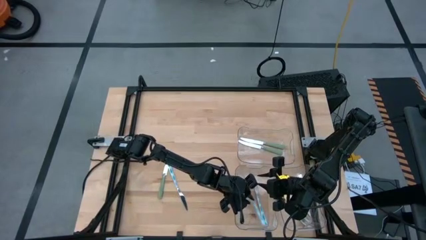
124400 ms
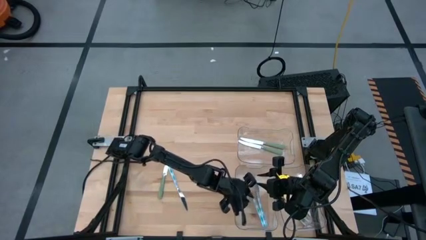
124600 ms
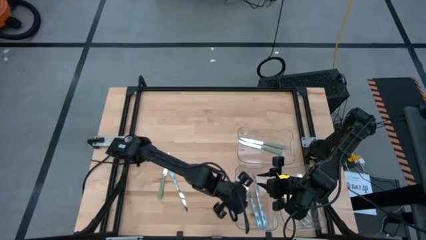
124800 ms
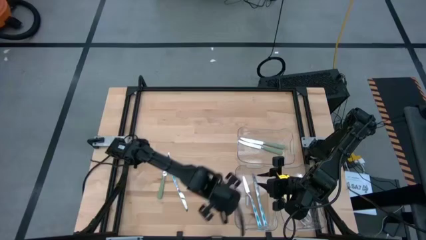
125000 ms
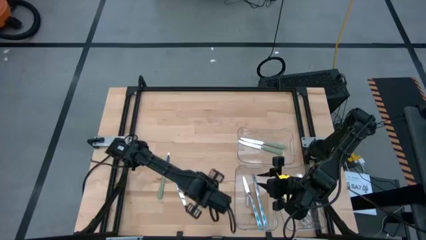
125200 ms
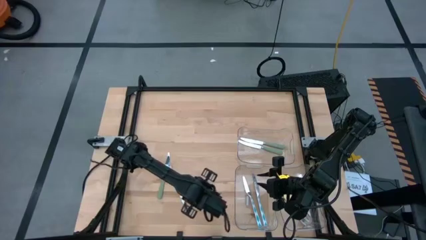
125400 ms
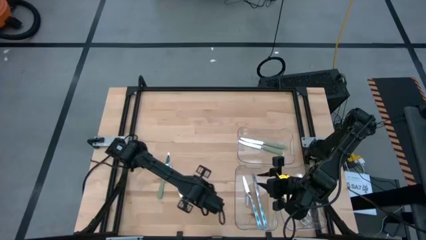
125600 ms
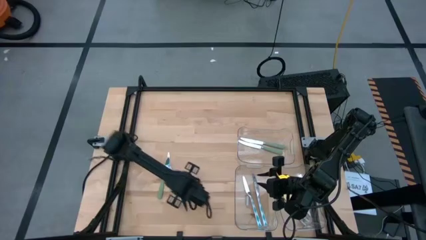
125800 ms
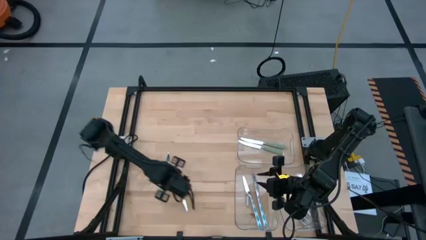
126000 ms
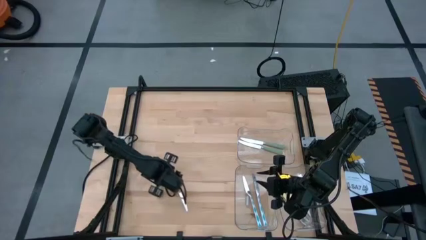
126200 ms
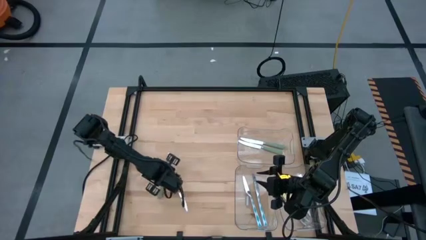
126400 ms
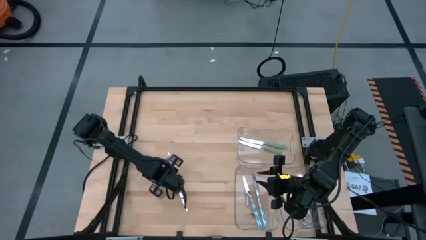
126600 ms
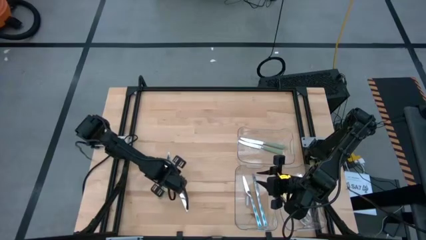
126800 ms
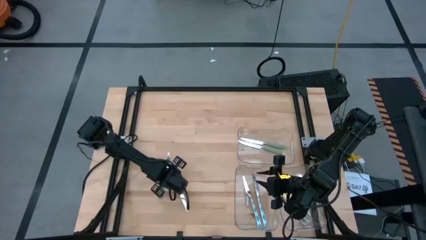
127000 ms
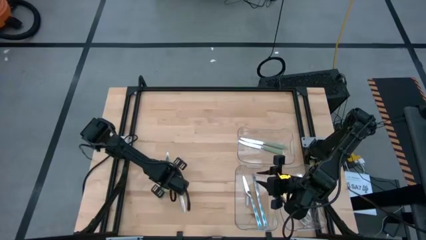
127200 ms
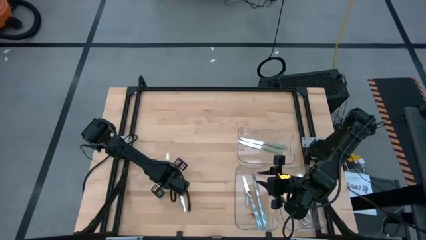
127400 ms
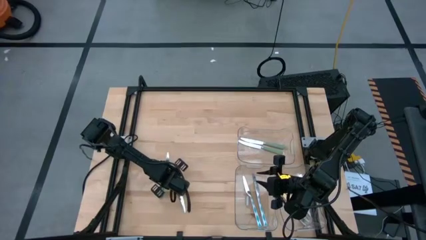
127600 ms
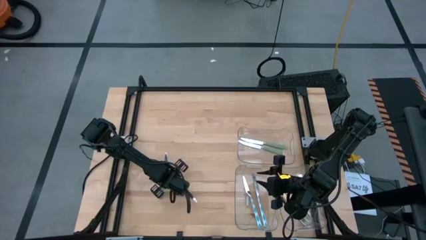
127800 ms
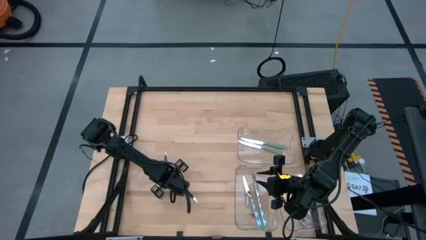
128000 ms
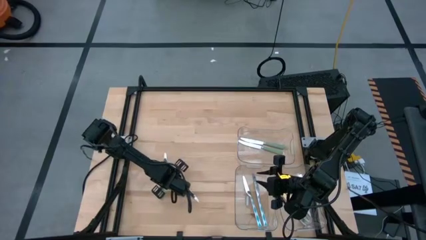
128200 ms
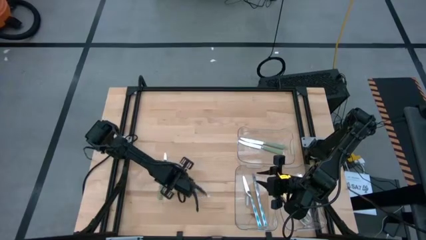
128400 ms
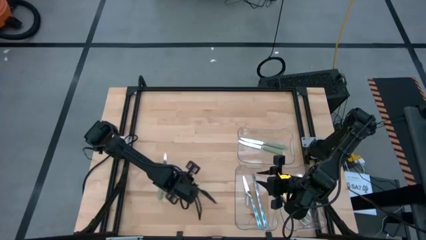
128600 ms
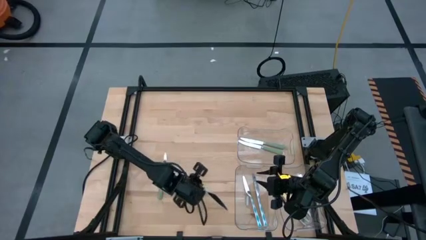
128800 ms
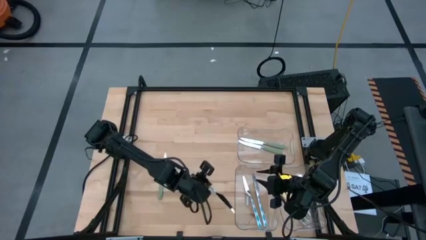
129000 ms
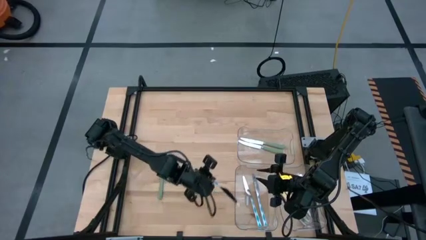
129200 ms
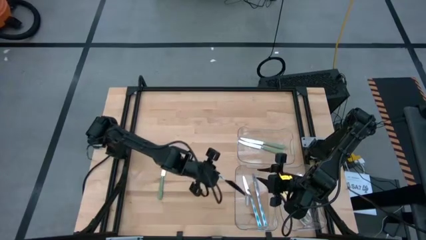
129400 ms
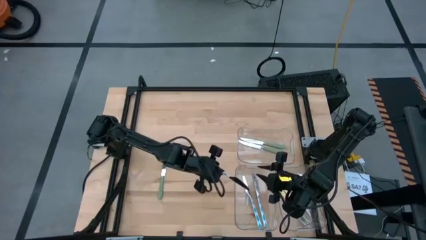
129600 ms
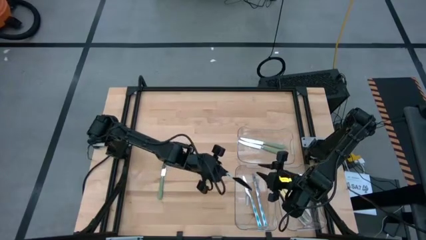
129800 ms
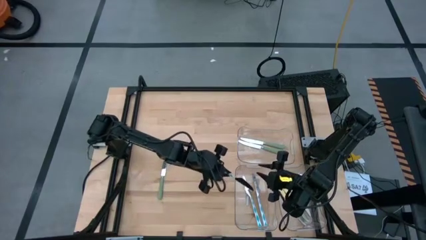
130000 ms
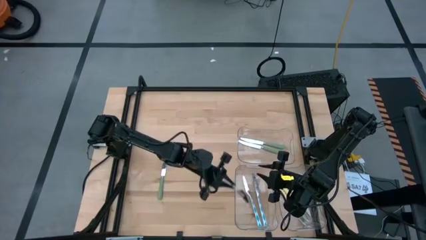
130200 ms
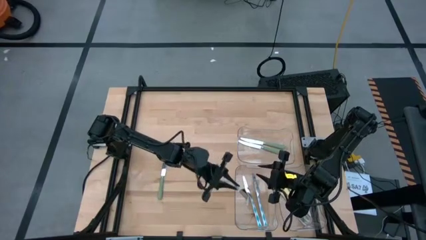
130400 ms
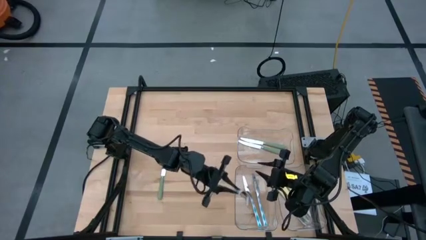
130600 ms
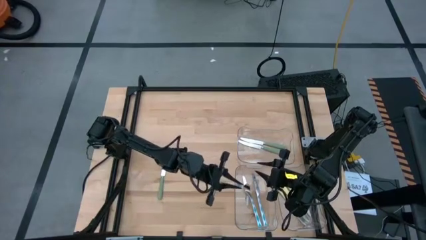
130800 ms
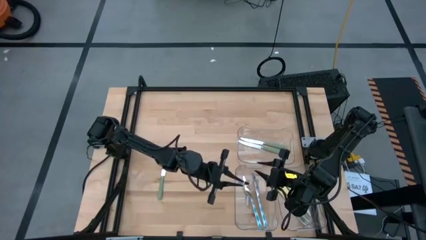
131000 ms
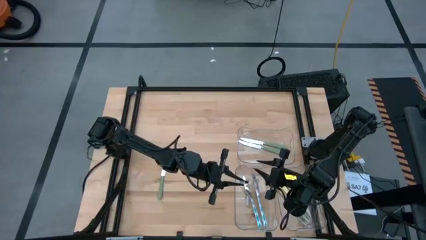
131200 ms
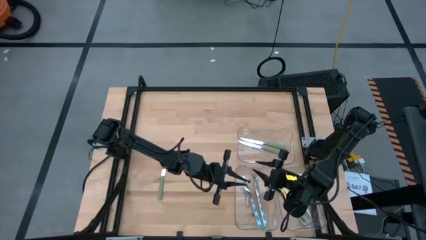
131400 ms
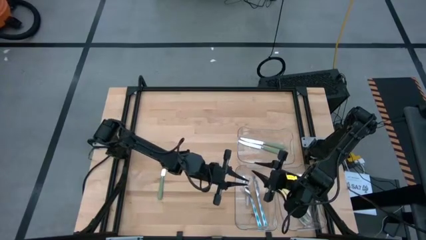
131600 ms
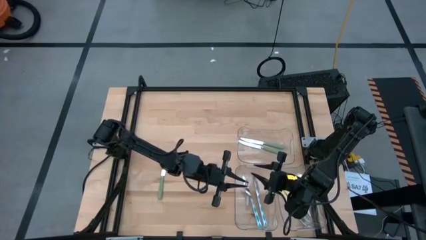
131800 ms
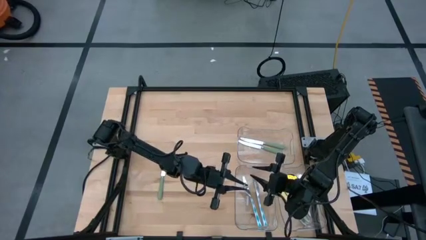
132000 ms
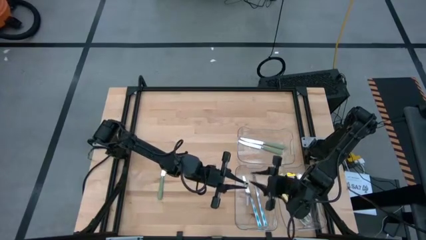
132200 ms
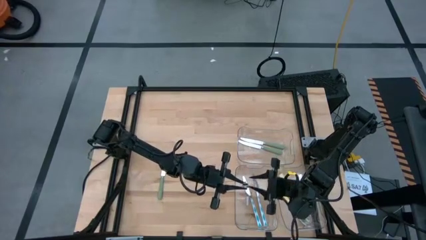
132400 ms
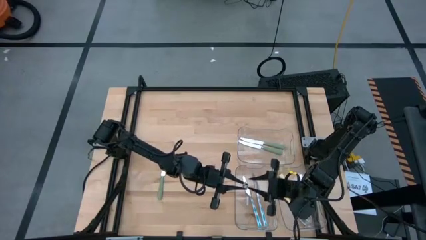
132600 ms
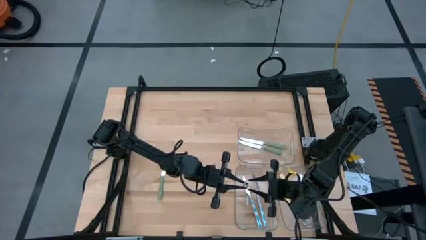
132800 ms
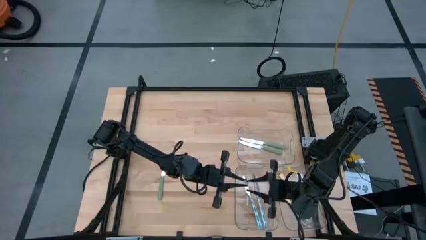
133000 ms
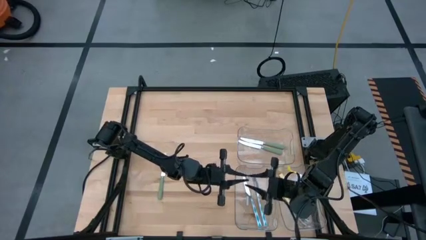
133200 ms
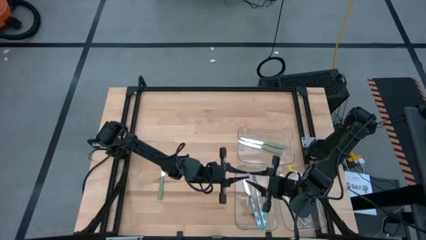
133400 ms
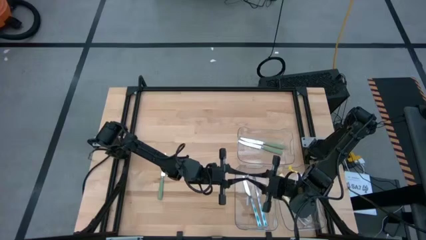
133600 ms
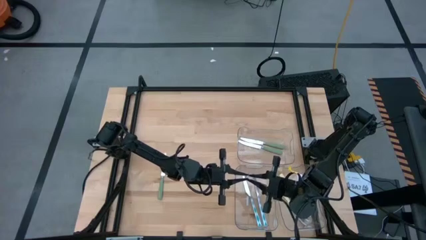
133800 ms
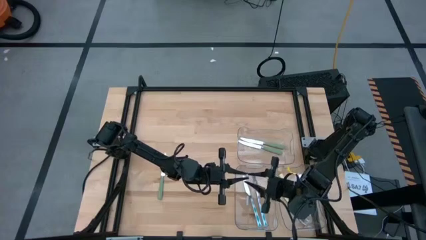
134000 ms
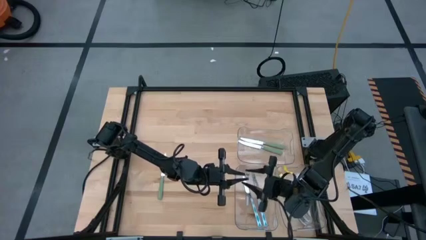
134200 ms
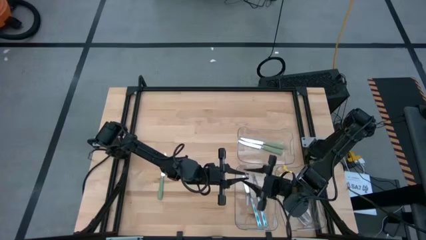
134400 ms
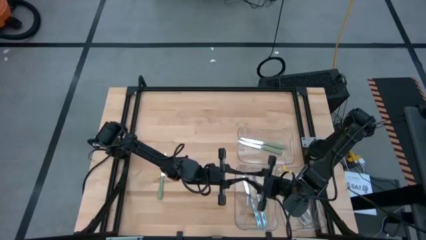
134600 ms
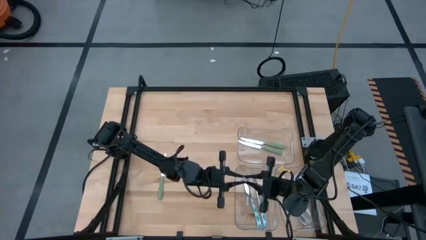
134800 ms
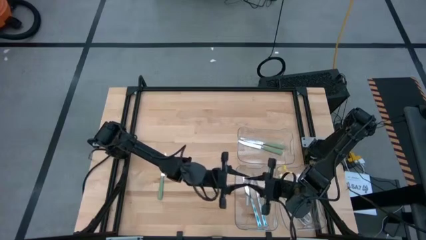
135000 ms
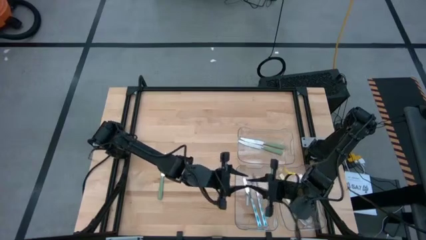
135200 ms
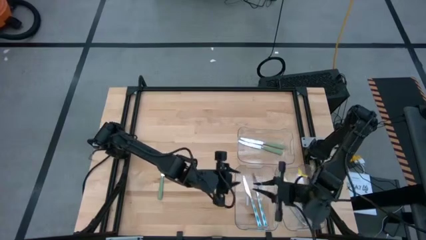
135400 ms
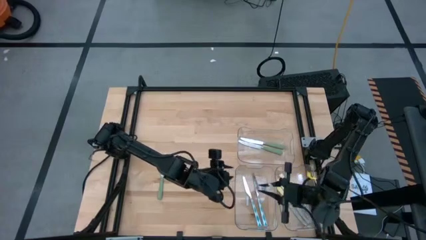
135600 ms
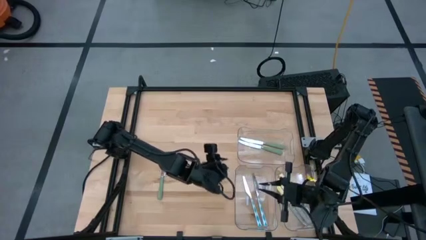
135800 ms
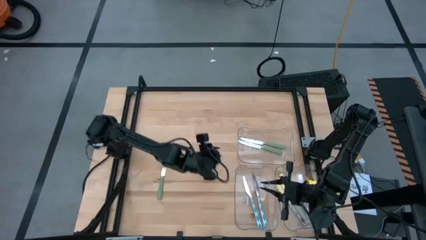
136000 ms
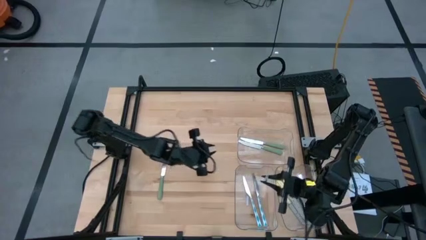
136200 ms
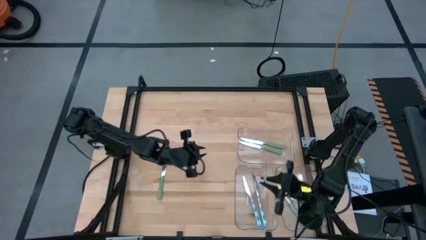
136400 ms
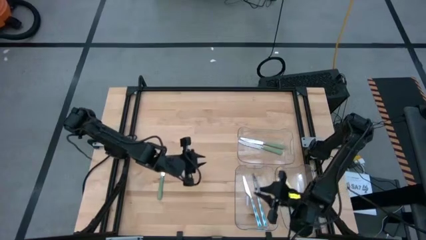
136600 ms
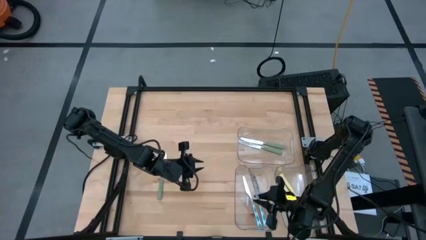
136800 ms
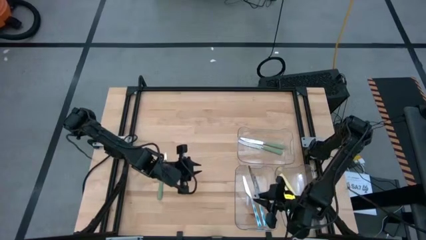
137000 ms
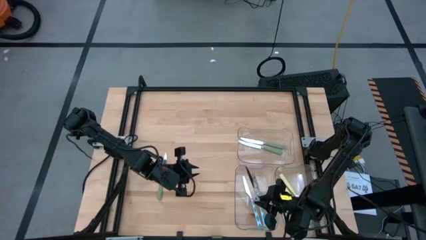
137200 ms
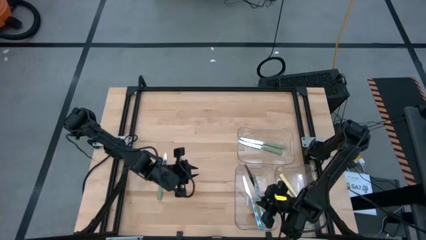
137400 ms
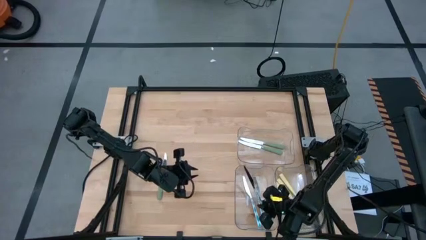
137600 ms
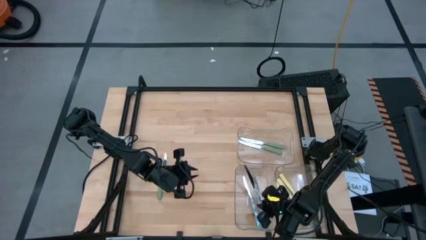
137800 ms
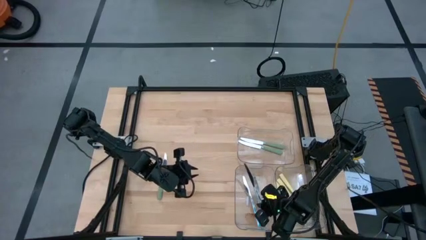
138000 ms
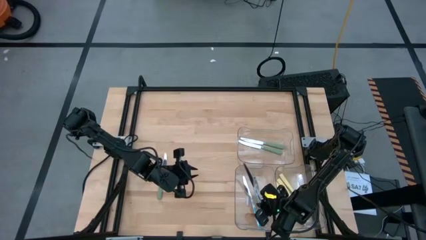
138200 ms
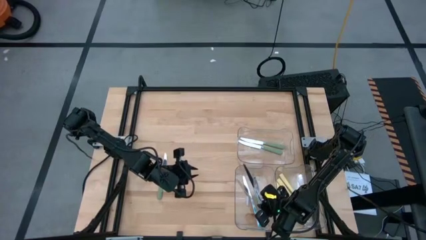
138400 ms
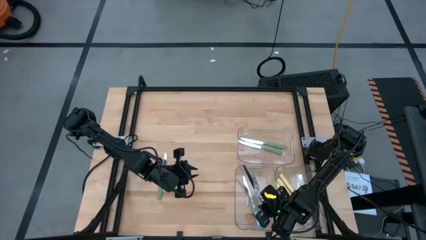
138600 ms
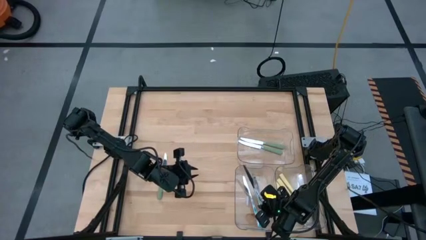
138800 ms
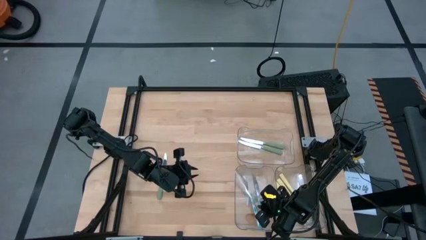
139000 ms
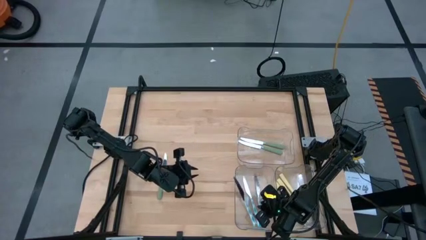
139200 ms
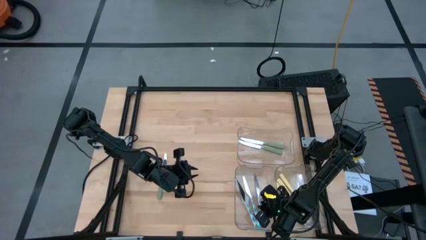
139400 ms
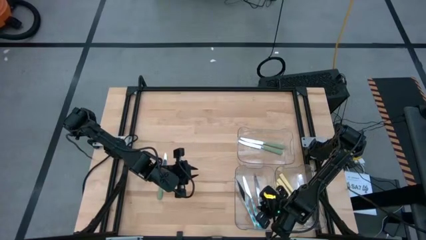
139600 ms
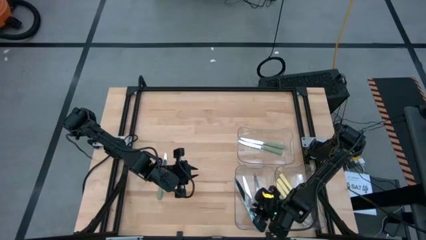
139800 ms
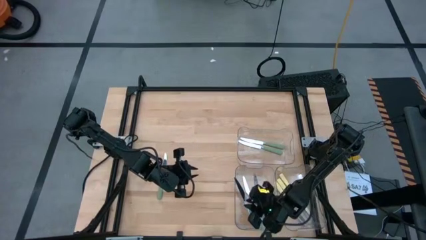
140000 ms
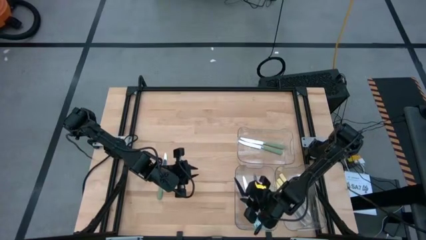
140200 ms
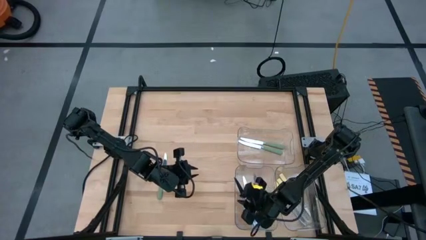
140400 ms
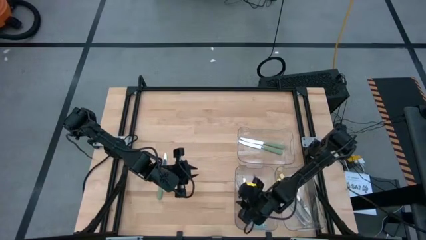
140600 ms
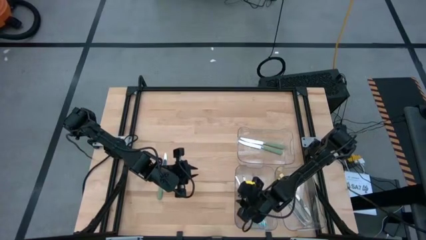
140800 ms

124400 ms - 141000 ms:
Task: Sort silverware by color (type)
Put the blue knife into the bottom left transparent bin

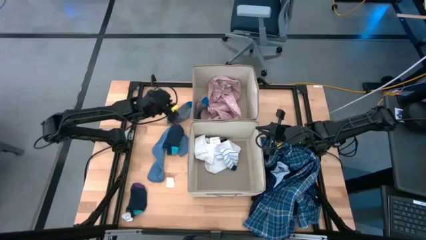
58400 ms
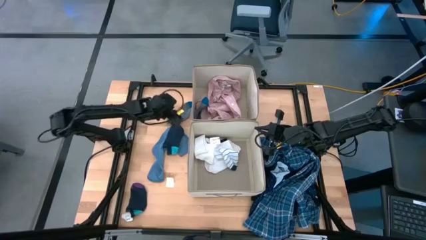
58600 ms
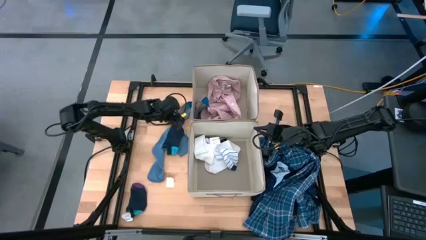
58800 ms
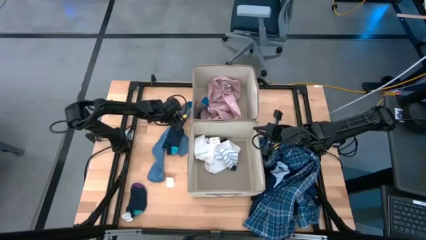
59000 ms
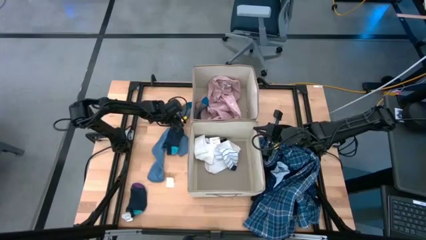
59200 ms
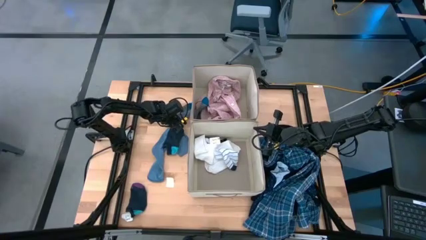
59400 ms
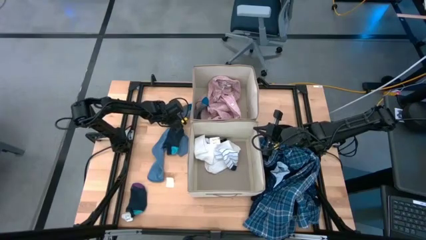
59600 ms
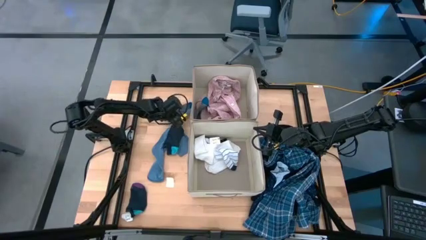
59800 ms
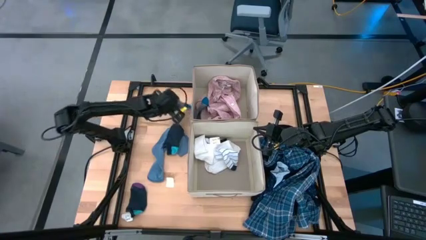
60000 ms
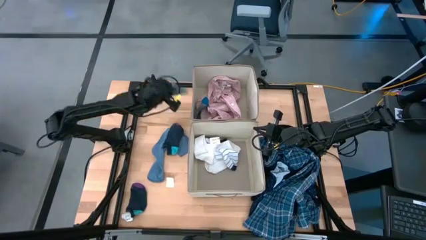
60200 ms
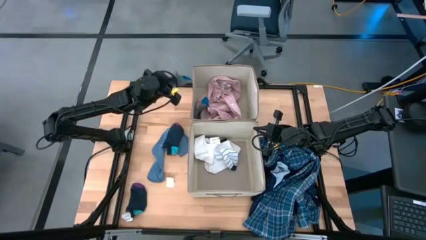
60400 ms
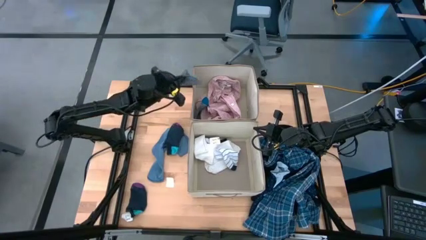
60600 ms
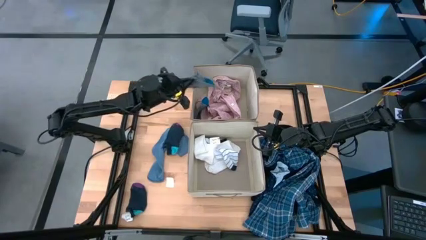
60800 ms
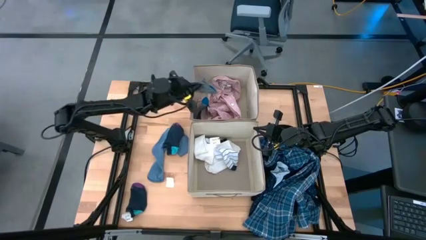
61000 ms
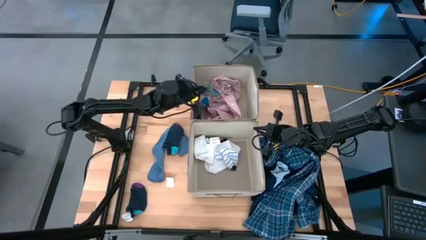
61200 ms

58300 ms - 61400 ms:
Task: Sort clothes
Put the gray sock into the top laundry organizer
